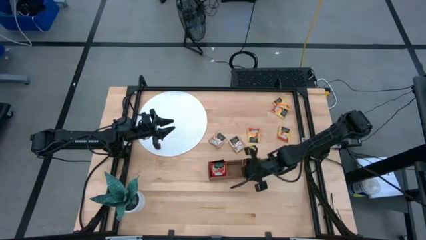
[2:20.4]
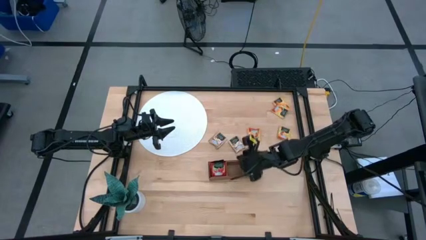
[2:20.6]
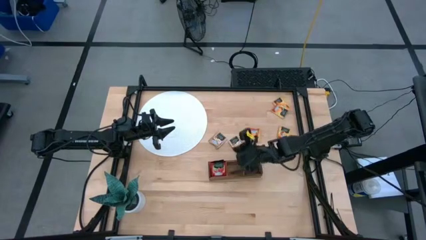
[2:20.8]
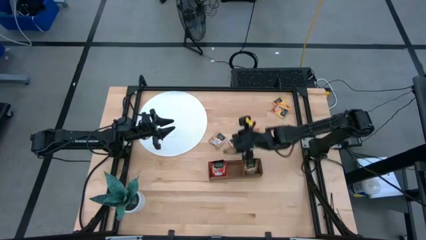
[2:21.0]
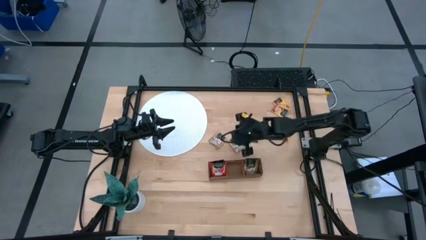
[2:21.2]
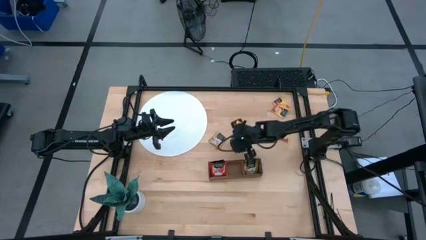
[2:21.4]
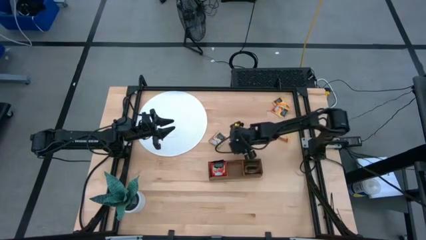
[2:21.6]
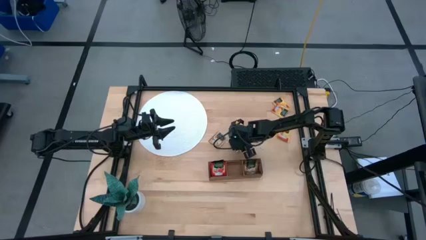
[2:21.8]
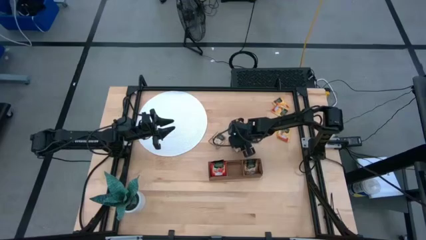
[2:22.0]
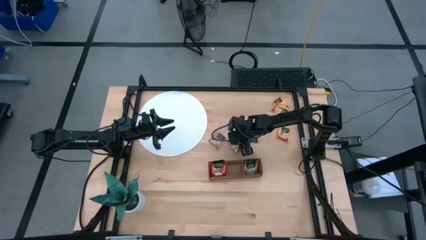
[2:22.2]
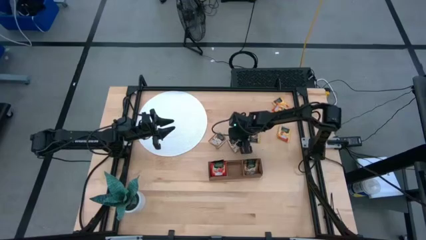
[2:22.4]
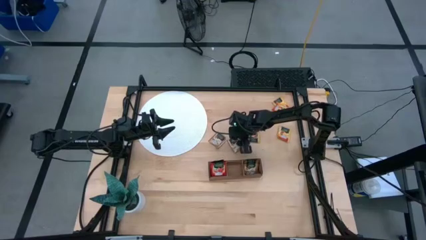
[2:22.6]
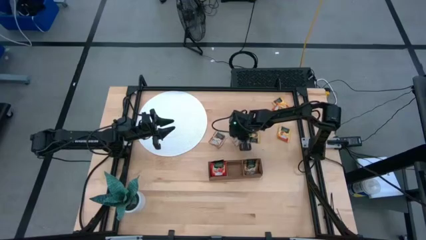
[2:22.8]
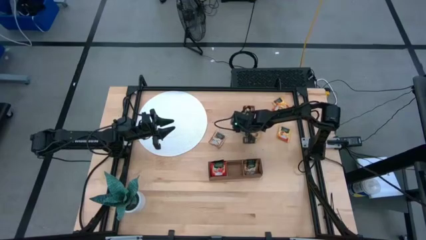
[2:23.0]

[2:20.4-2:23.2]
Task: Pick & Place Tea
Put the brown tea bag into the right section of the wooden organizer

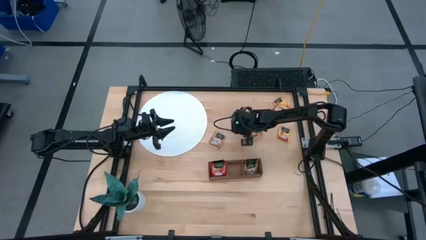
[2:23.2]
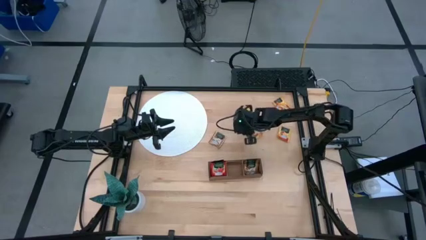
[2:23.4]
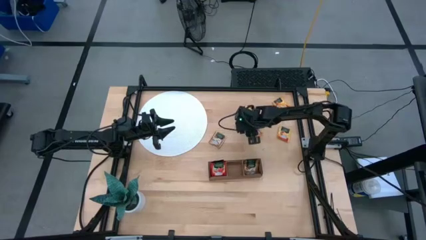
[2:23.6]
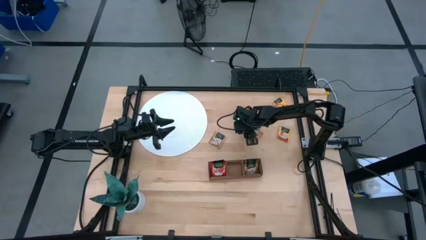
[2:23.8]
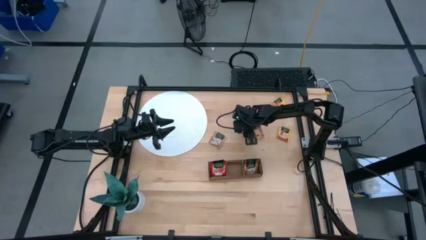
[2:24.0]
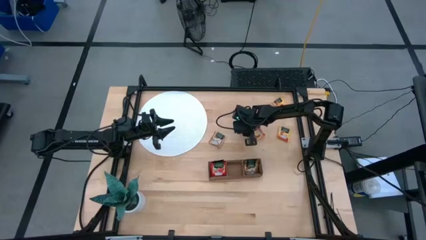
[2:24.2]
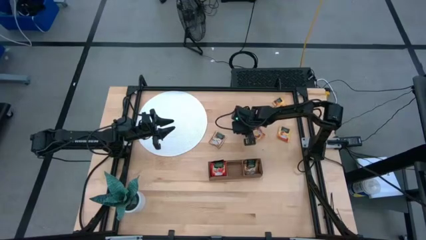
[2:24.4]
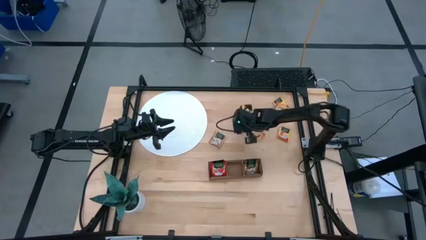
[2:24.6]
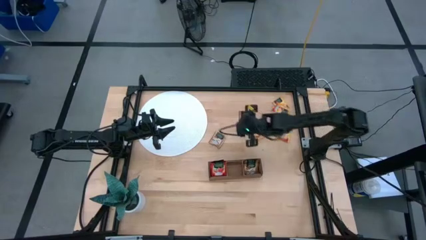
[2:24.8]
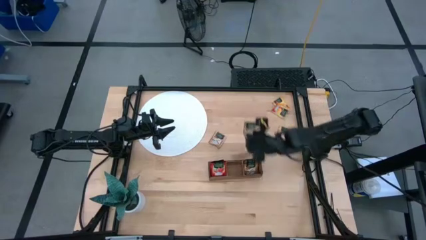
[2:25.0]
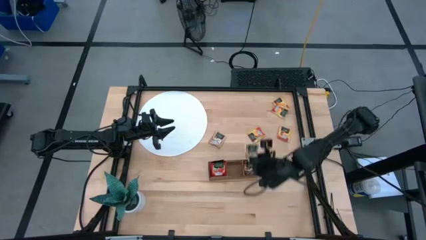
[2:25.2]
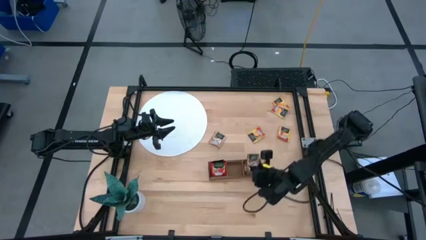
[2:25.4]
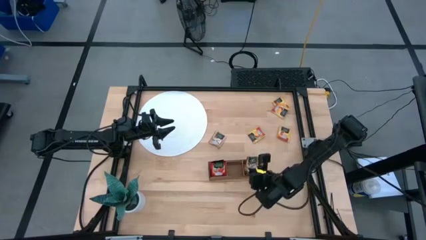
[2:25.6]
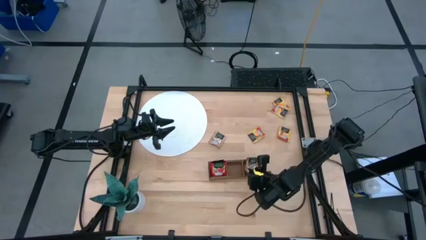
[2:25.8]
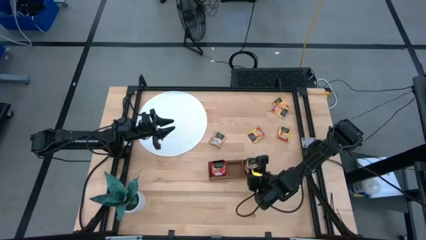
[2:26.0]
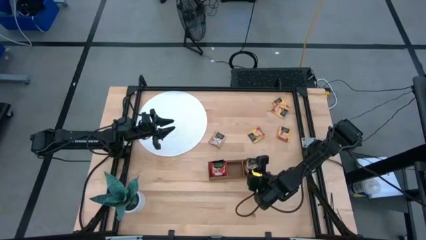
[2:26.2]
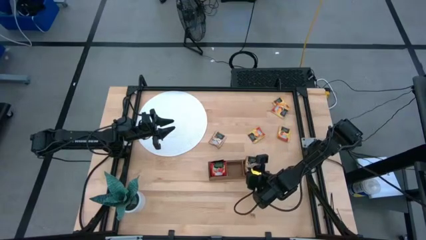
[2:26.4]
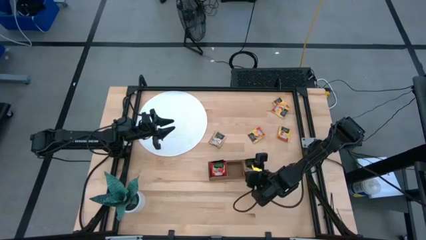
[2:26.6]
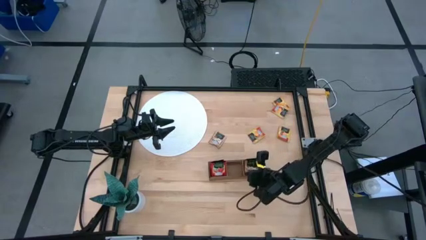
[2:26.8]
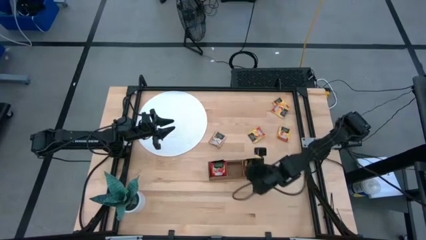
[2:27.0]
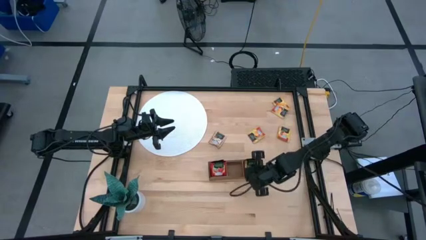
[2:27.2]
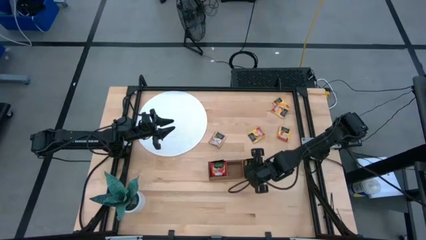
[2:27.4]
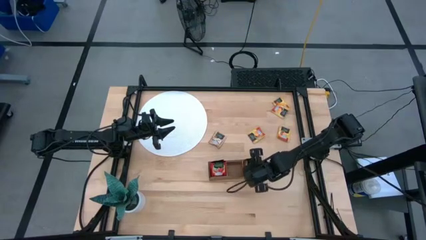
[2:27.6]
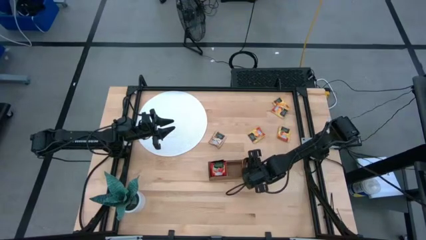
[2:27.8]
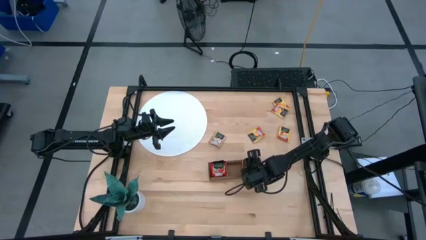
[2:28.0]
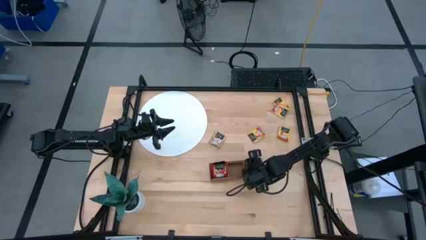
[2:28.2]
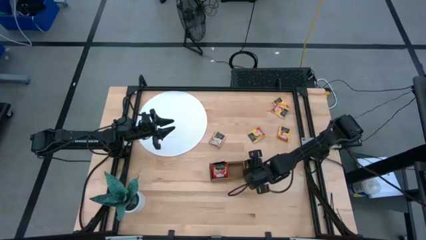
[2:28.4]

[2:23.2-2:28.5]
Put the brown tea bag into the right section of the wooden organizer

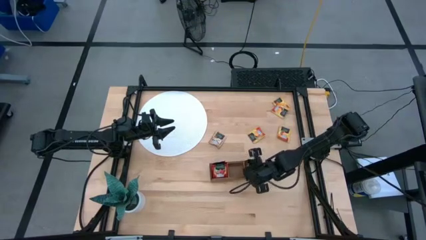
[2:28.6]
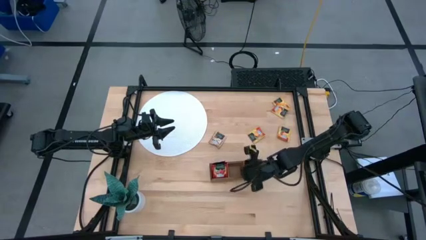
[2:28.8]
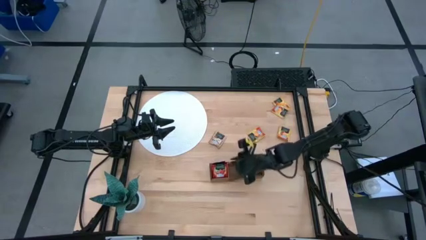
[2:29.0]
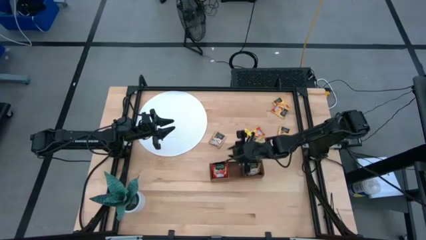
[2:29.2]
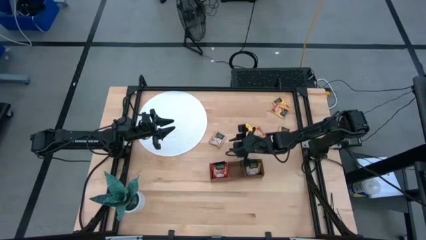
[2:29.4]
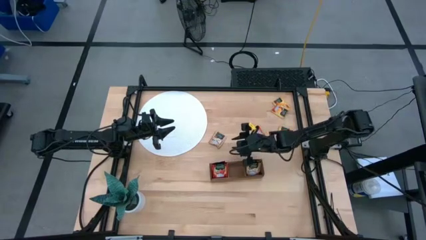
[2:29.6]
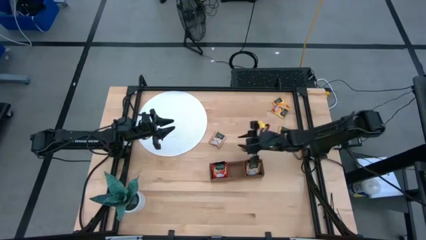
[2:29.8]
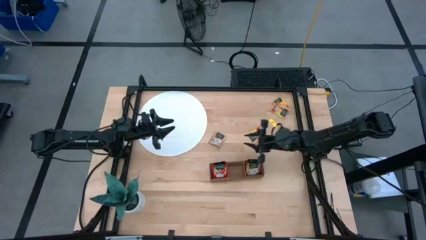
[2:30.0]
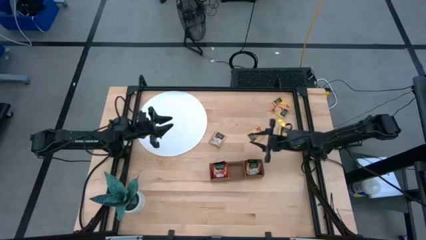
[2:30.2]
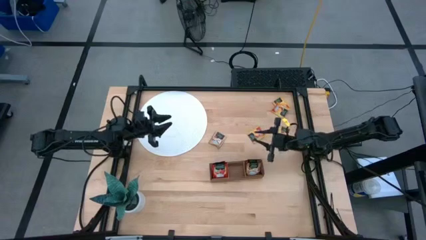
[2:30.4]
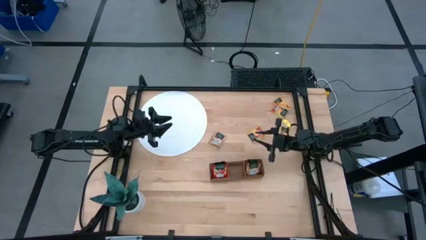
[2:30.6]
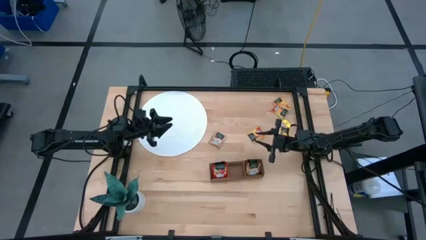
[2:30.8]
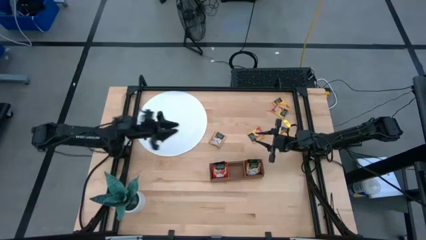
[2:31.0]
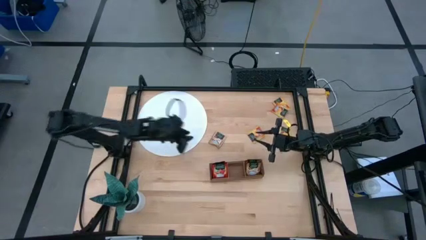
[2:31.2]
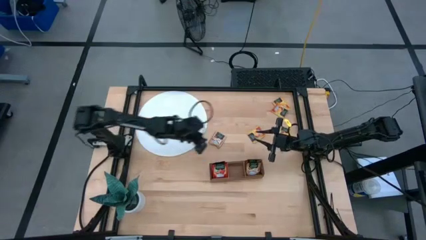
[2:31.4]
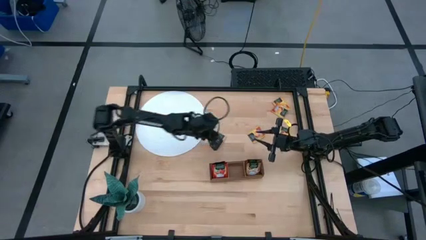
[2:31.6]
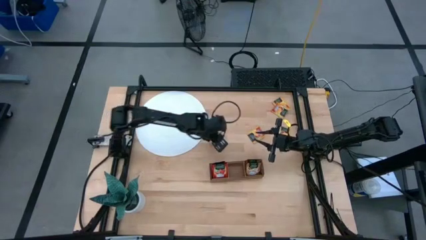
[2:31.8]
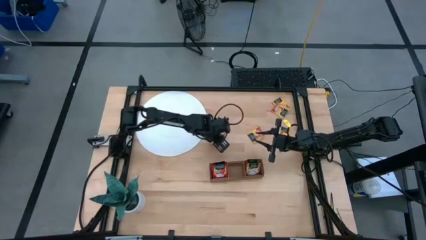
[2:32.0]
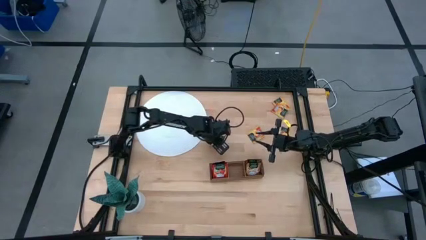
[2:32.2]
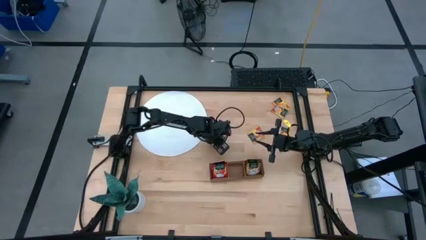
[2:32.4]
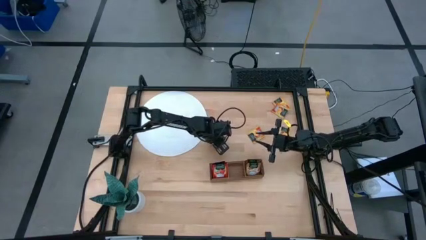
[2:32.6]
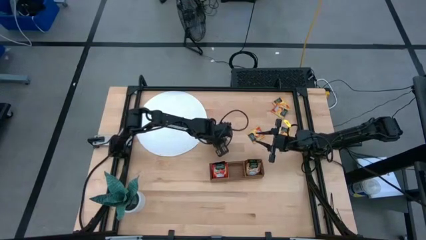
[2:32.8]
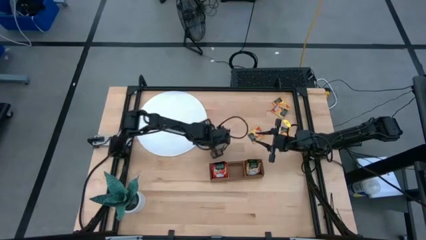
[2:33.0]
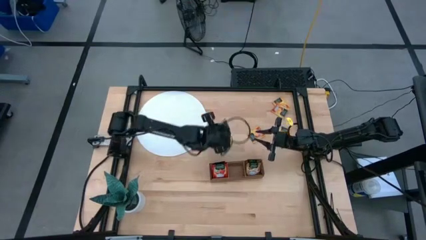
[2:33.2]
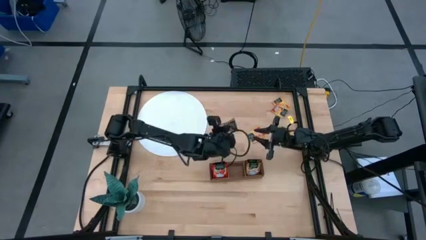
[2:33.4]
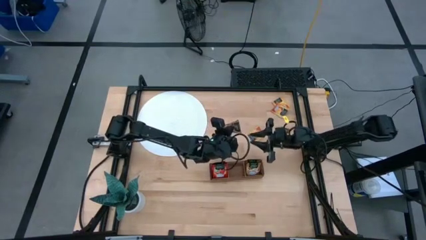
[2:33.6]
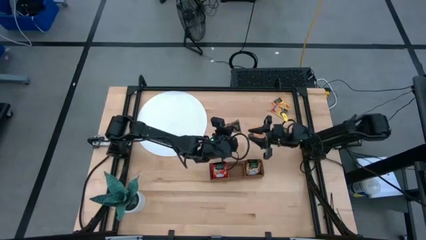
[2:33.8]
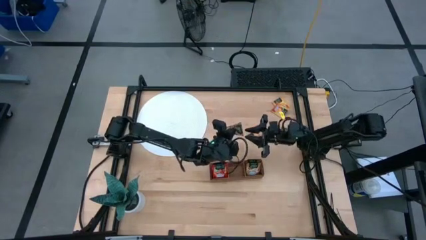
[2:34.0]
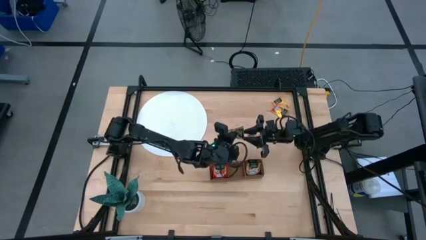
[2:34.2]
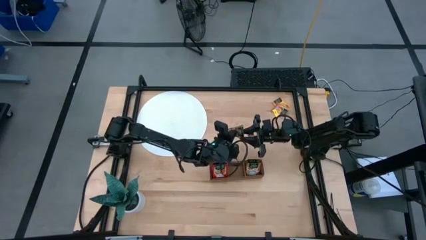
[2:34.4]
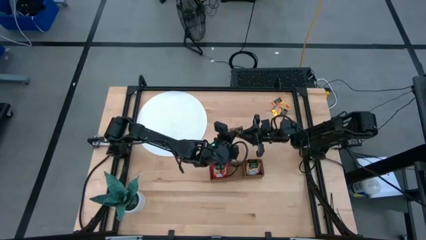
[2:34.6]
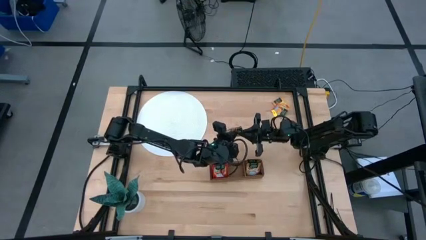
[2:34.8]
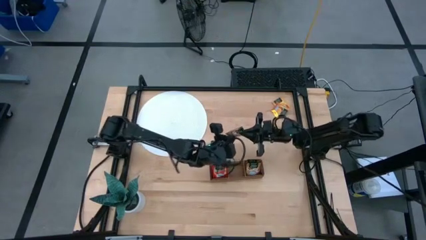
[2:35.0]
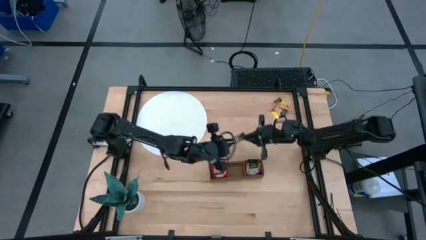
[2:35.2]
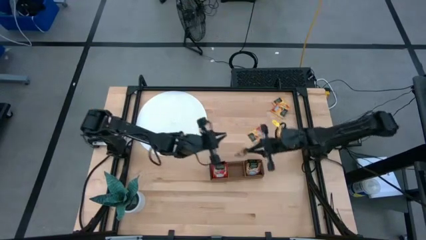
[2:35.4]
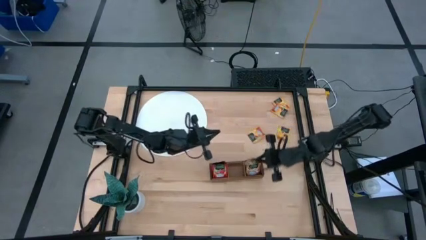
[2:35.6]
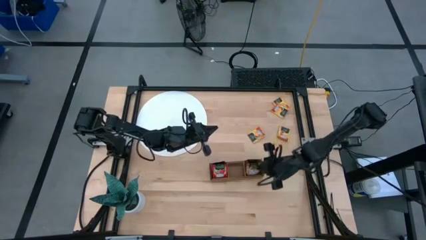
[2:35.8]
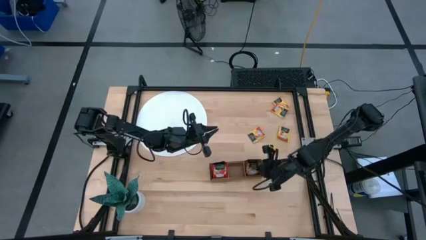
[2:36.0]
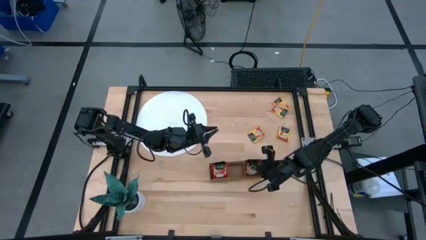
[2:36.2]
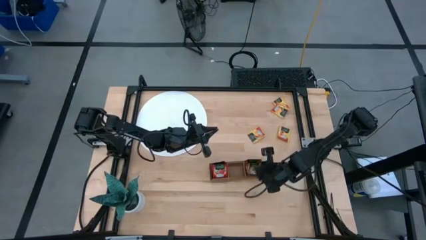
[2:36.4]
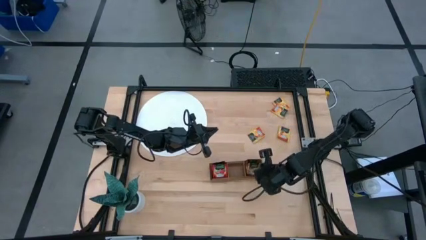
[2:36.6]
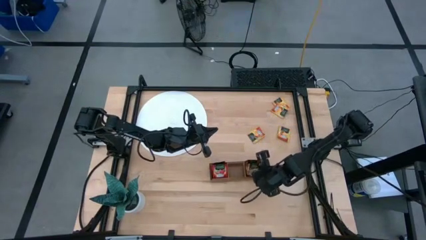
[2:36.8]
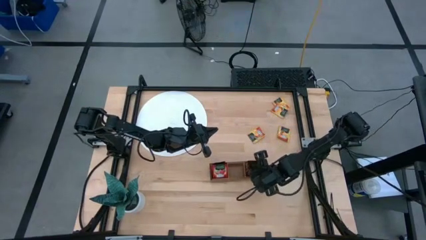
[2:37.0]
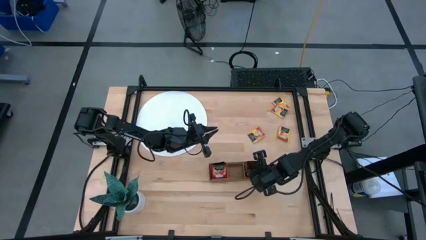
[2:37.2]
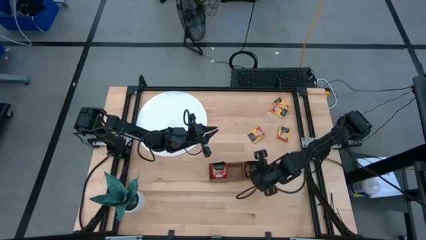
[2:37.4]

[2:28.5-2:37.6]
Put the brown tea bag into the right section of the wooden organizer
